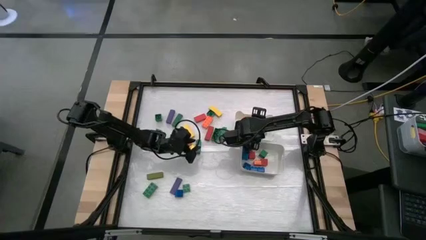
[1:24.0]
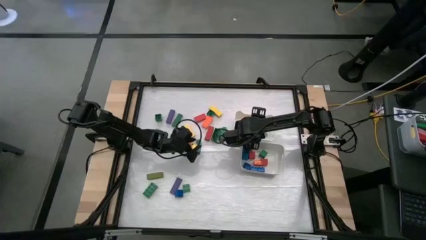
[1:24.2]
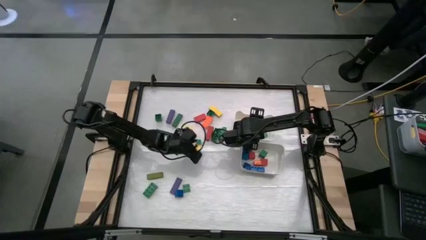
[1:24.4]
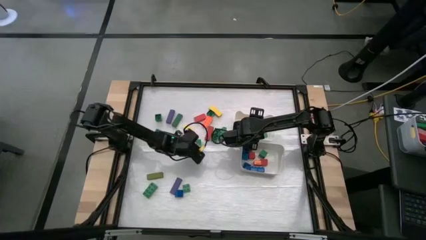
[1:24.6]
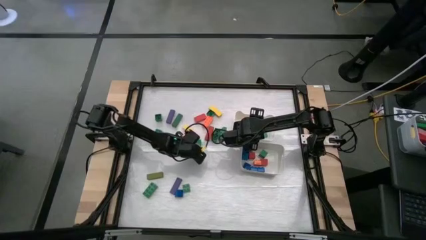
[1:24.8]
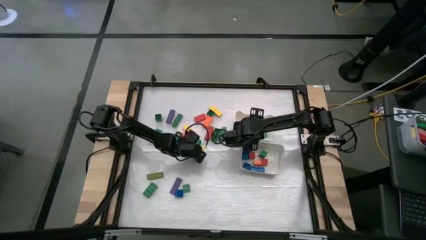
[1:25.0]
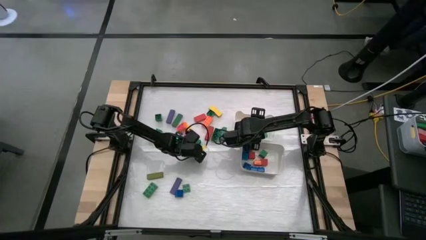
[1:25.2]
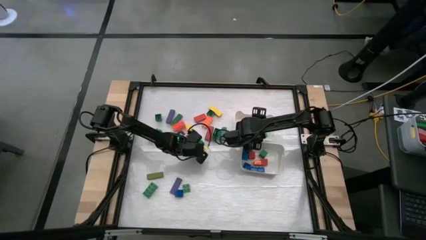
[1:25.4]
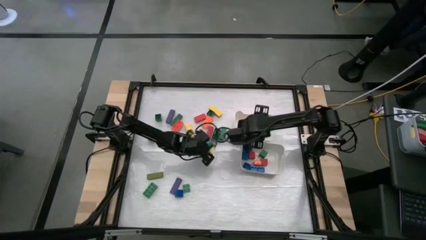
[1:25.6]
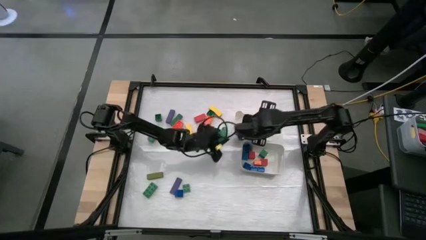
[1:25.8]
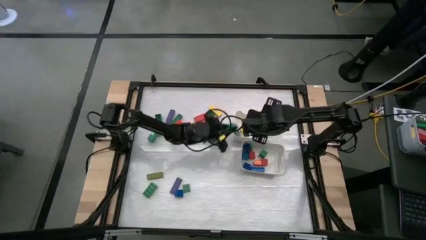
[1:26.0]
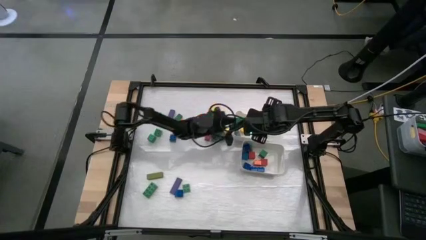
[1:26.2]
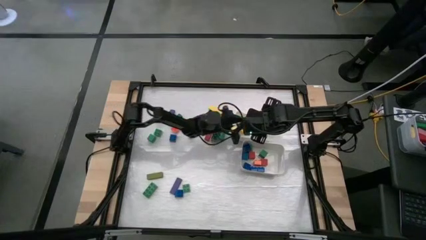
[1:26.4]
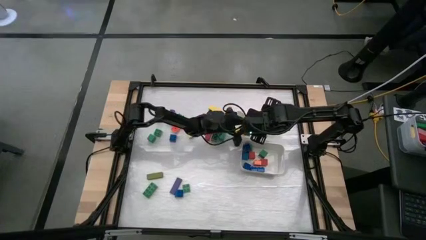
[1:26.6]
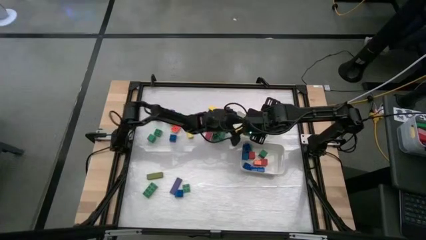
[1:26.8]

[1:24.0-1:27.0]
Task: Sort blocks by size
Put the green rectangle game piece into the top white bin

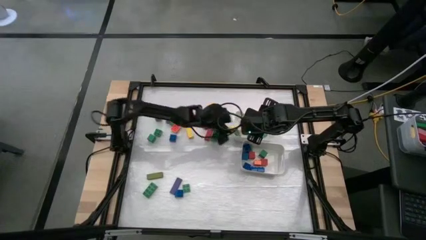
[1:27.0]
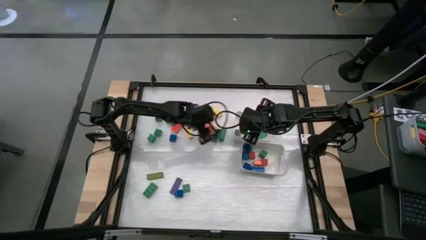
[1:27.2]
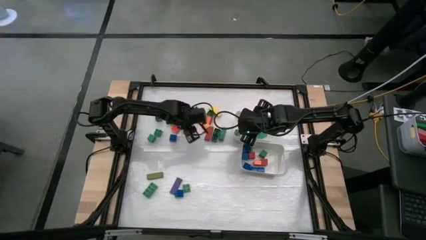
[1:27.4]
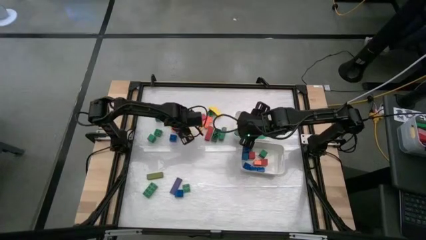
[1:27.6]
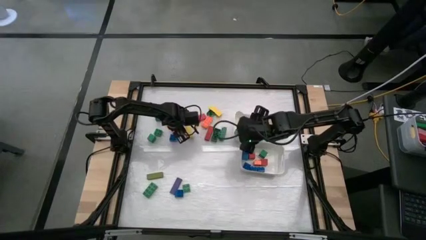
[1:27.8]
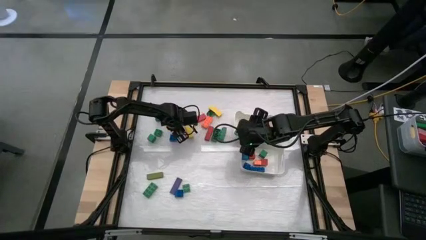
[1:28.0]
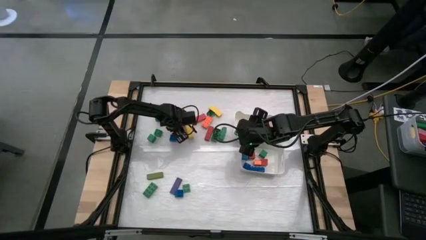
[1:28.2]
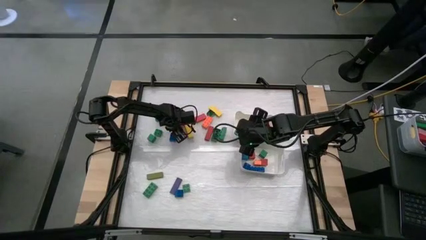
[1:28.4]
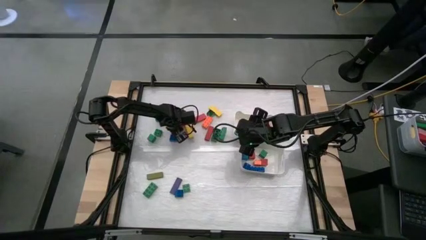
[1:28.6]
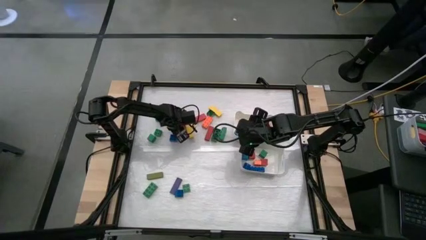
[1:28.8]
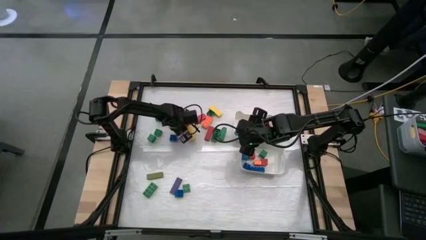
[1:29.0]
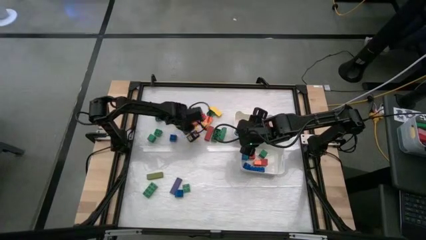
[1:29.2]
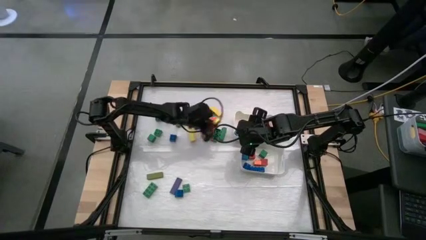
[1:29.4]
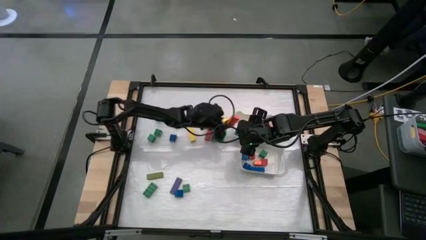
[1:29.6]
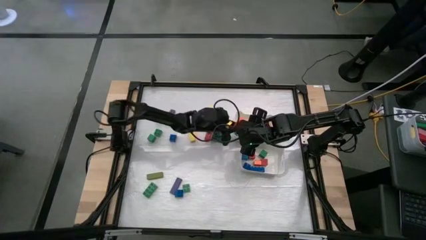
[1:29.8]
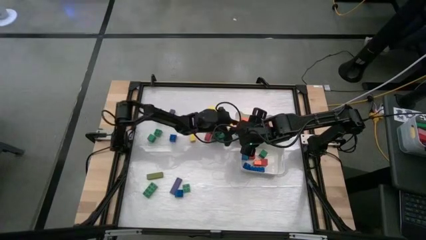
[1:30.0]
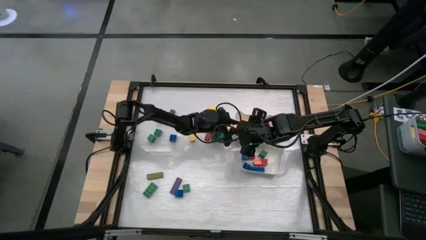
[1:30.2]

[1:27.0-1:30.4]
Put the orange rectangle game piece into the top white bin

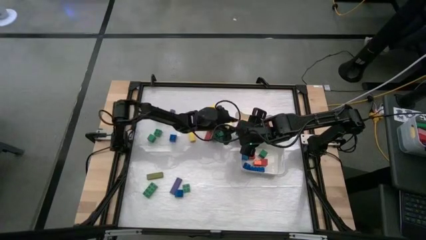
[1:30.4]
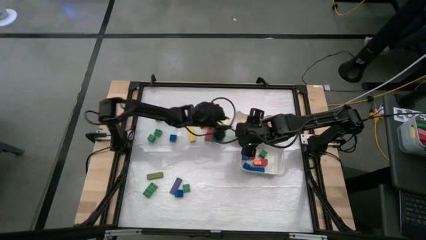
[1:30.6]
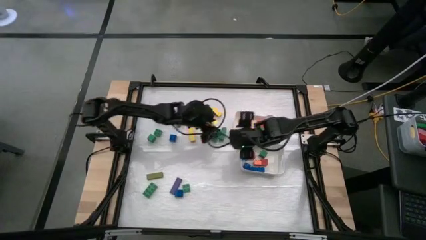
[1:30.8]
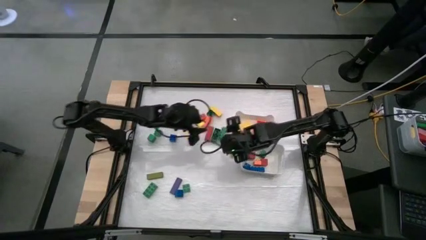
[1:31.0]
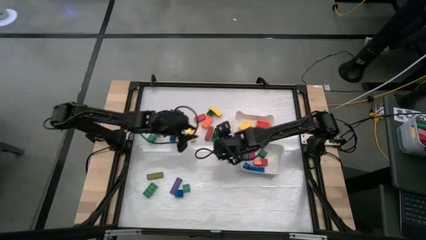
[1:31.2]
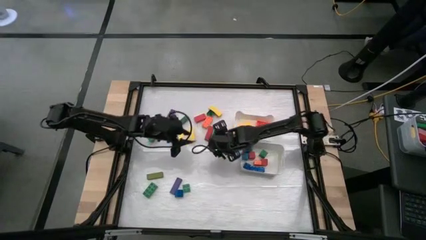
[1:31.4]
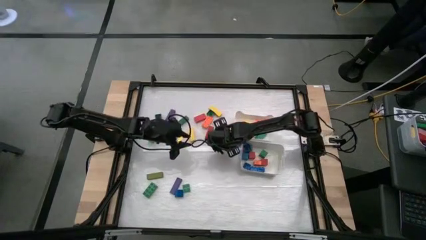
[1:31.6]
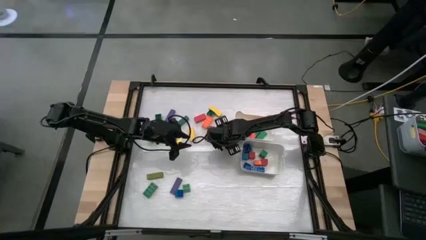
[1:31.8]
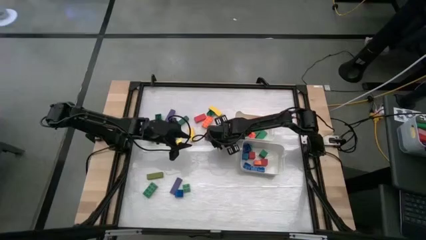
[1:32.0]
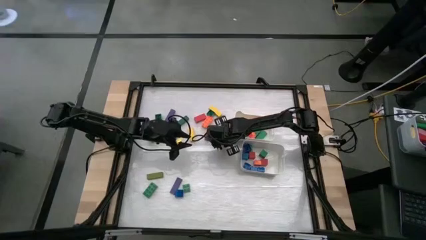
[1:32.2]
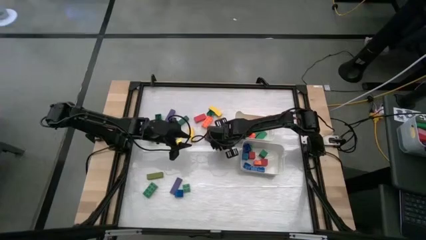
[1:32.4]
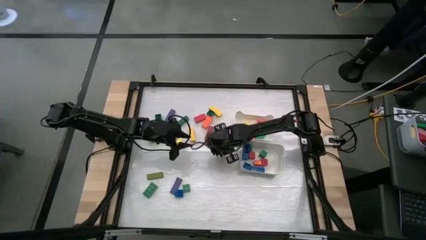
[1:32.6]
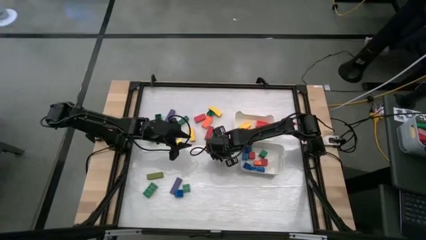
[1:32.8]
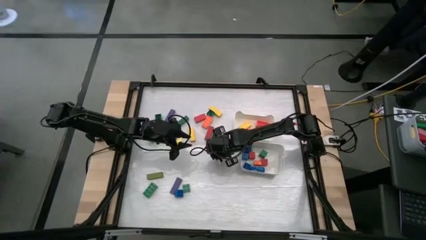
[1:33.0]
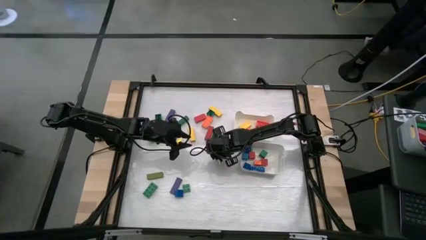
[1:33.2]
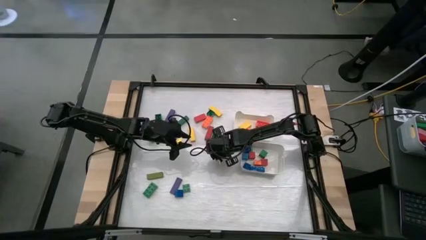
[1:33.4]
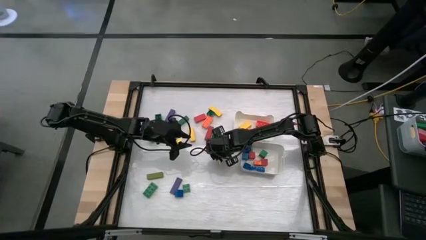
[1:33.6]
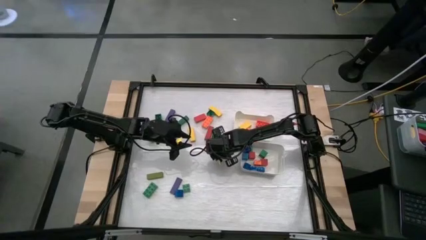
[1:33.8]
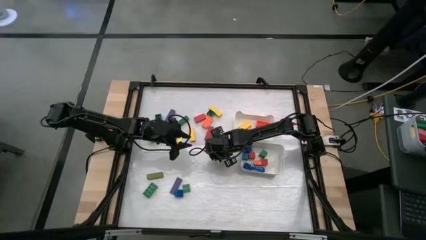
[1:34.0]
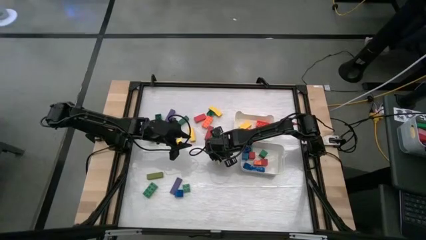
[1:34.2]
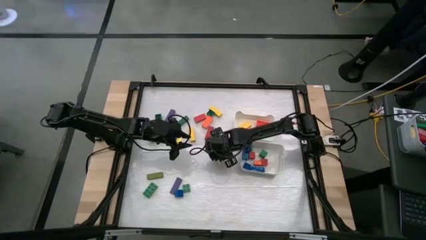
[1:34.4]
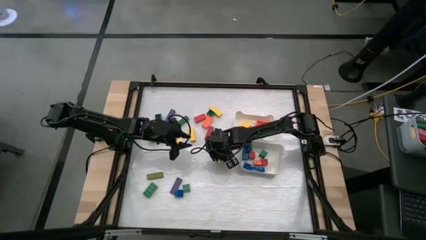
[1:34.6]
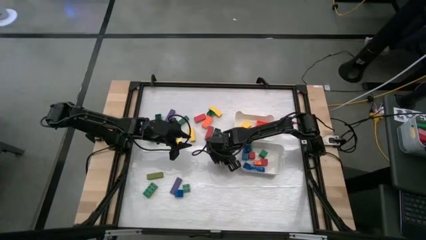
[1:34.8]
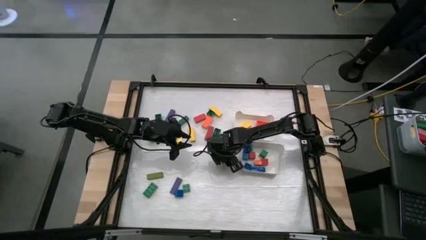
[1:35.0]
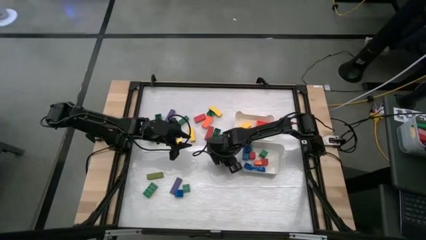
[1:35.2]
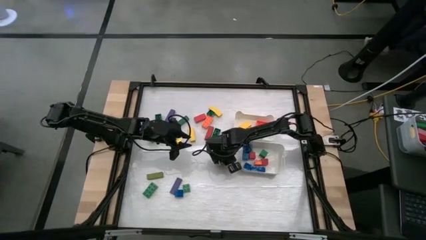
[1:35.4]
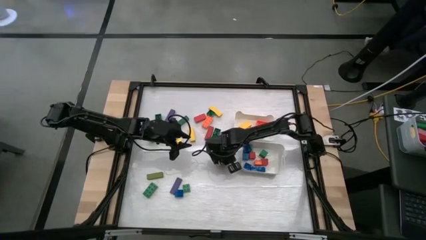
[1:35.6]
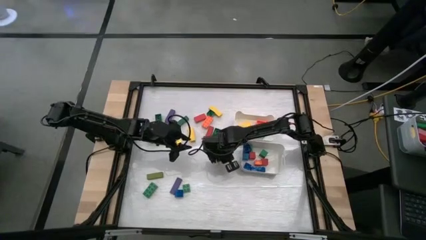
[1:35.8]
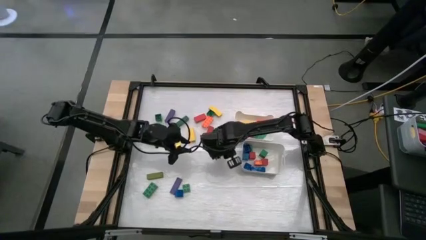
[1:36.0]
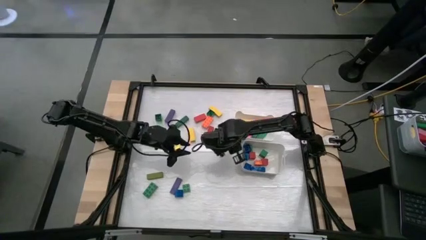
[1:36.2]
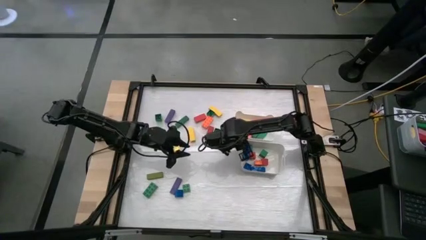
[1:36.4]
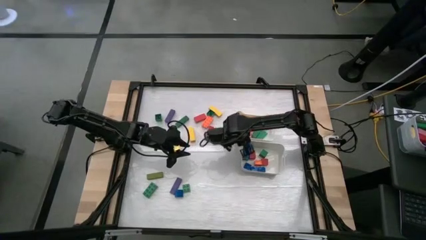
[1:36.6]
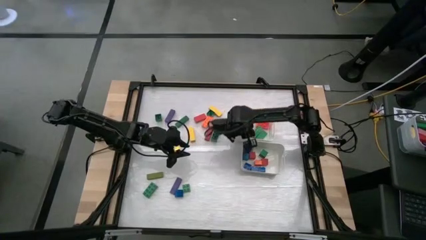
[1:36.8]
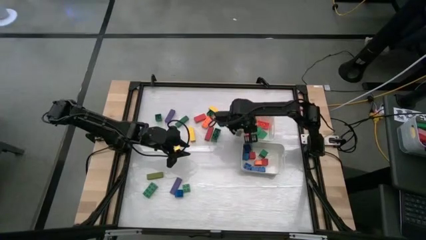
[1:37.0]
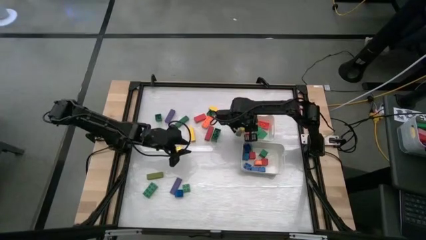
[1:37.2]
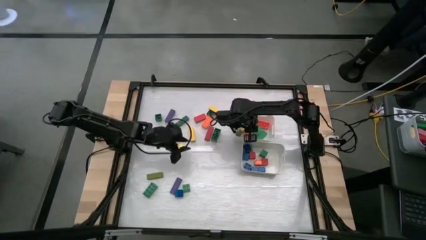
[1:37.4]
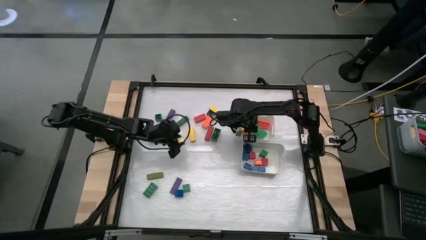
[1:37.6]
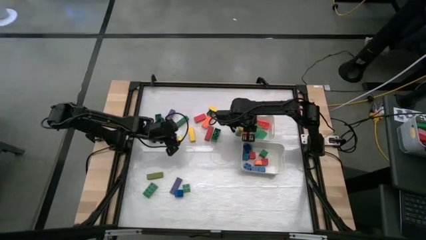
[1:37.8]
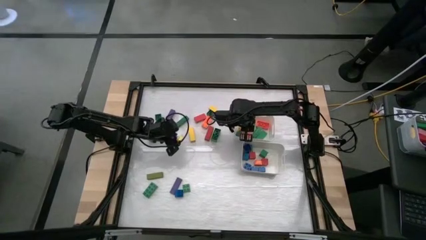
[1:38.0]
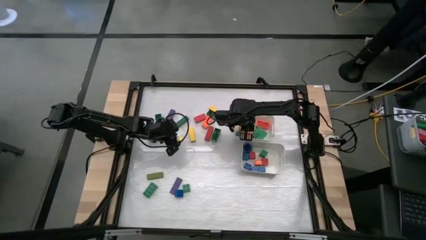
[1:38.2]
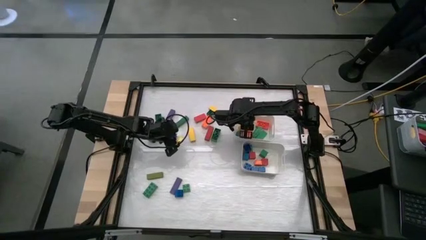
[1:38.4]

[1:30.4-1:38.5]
Put the green rectangle game piece into the top white bin

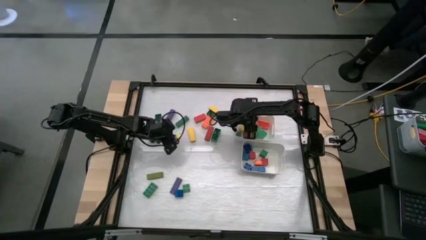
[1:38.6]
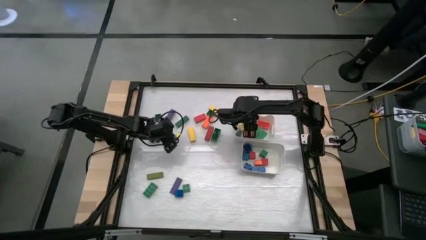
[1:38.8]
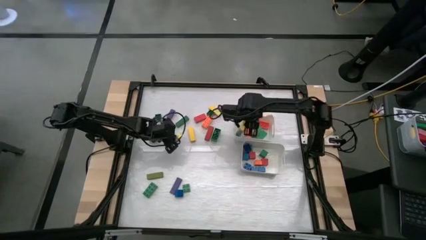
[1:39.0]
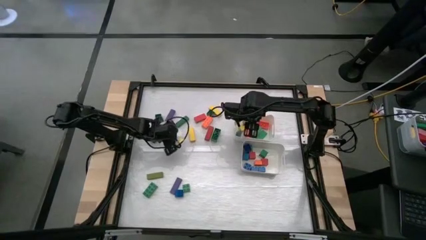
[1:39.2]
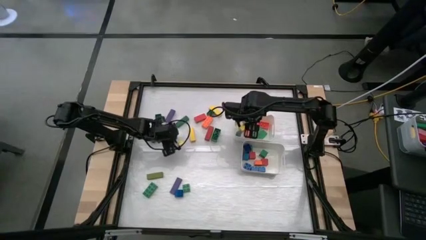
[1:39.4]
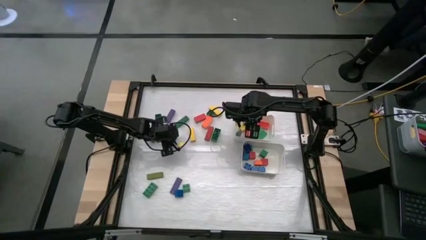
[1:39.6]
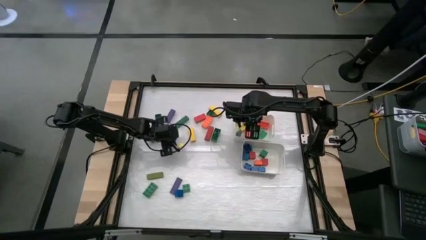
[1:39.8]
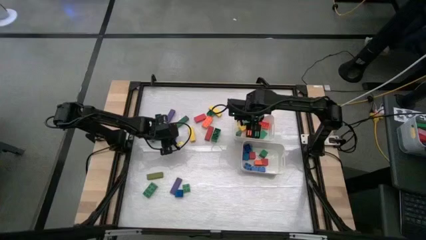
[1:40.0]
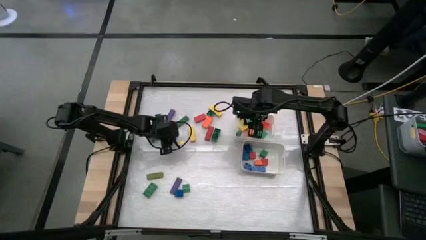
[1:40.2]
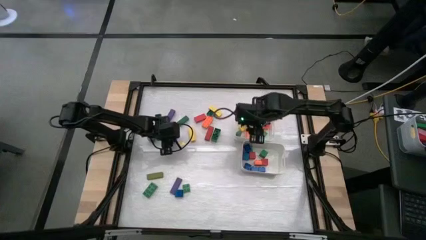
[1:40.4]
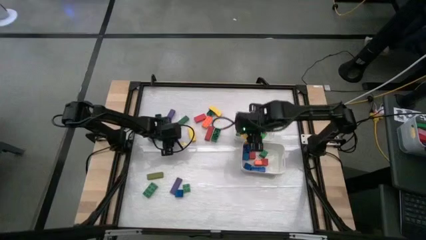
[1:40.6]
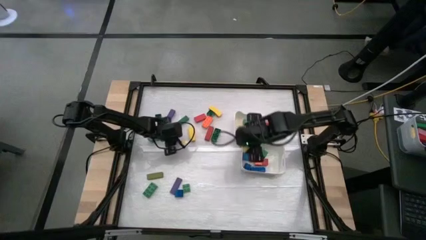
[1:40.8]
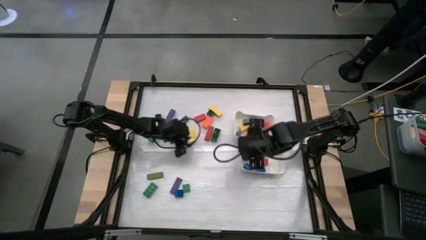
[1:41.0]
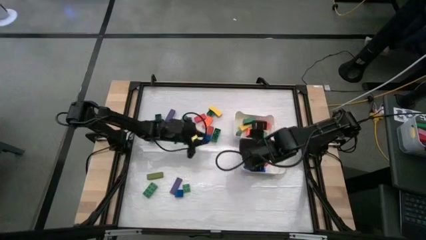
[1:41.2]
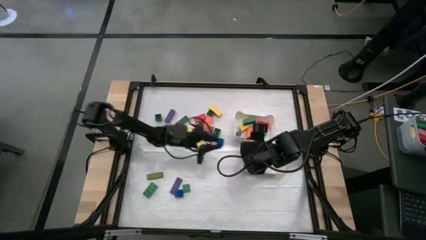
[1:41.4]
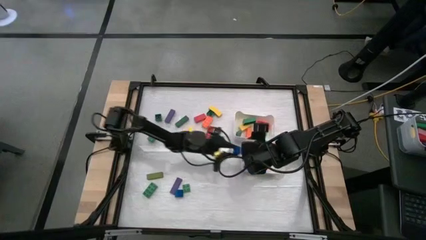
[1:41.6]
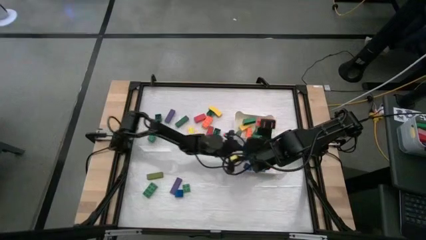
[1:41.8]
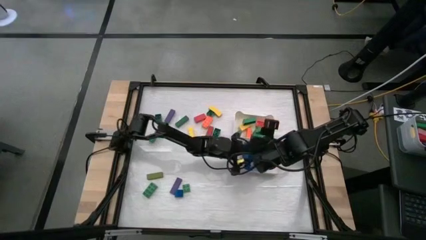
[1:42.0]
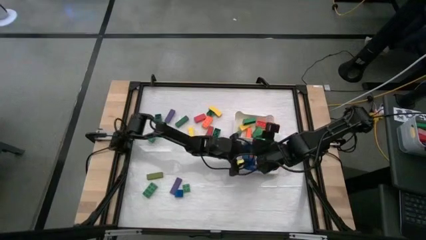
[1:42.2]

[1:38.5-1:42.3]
Put the blue cube game piece into the bottom white bin
